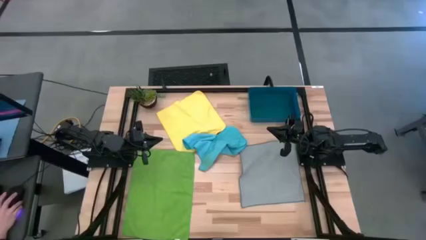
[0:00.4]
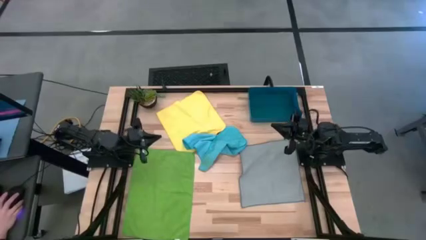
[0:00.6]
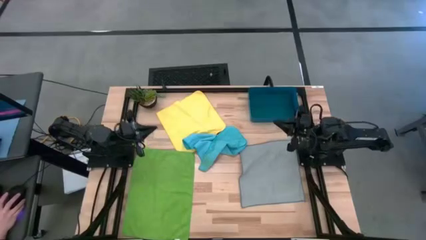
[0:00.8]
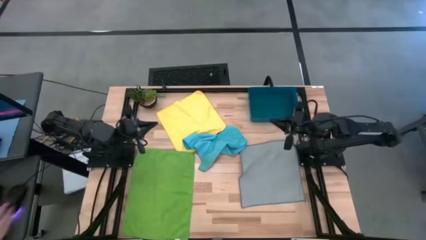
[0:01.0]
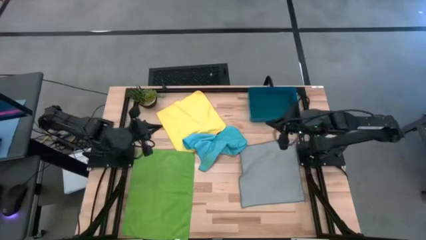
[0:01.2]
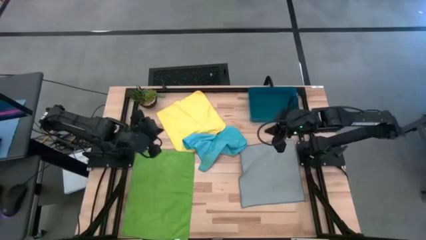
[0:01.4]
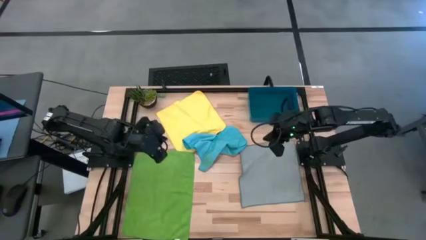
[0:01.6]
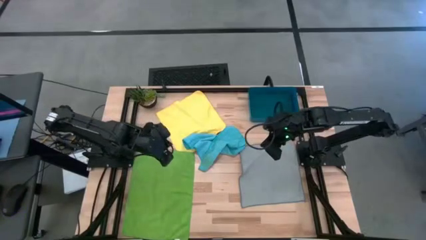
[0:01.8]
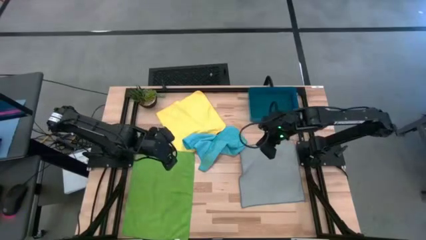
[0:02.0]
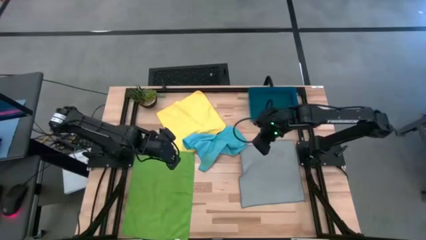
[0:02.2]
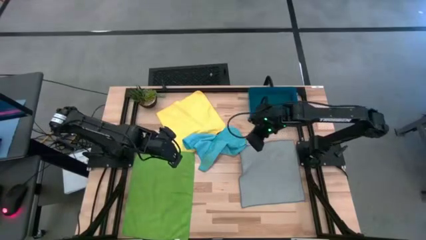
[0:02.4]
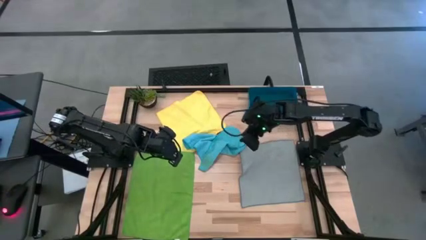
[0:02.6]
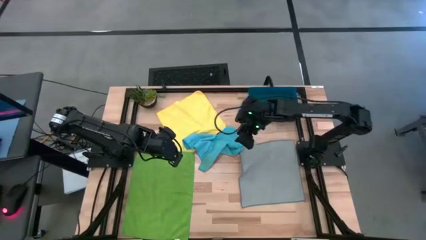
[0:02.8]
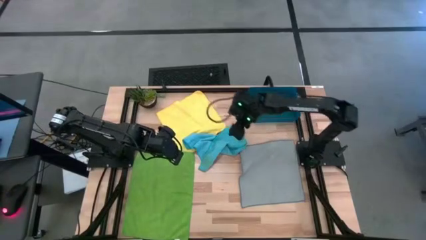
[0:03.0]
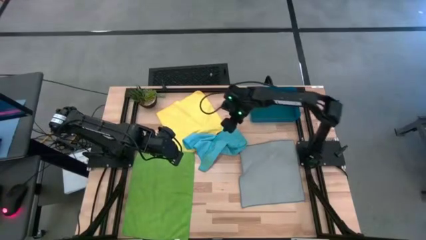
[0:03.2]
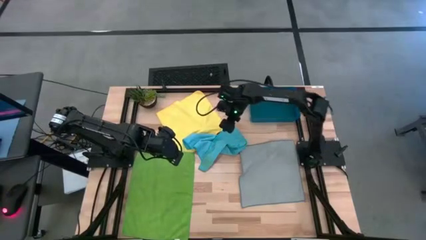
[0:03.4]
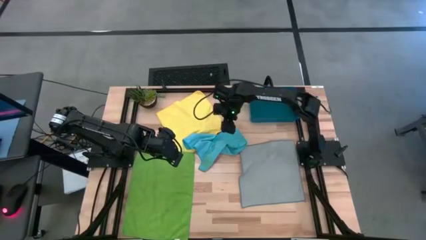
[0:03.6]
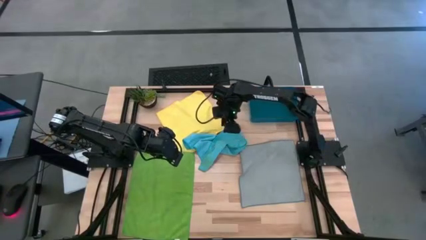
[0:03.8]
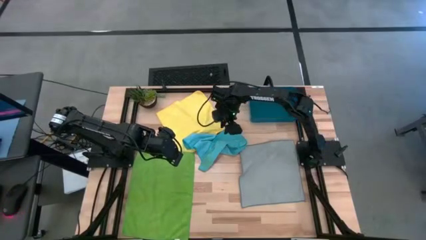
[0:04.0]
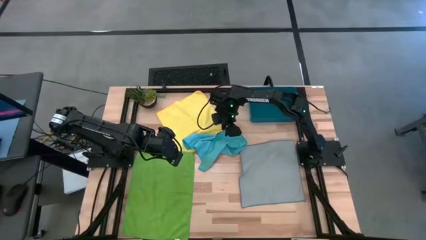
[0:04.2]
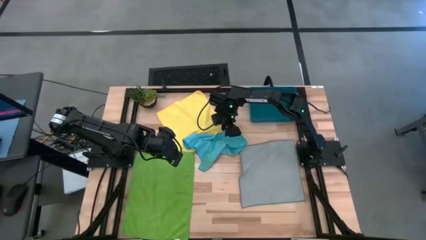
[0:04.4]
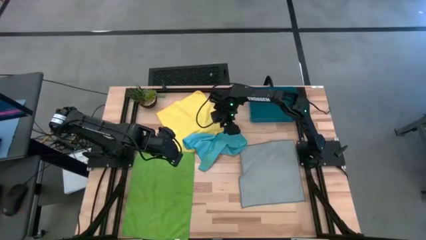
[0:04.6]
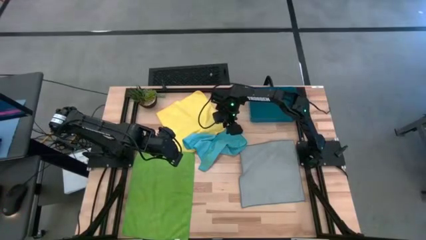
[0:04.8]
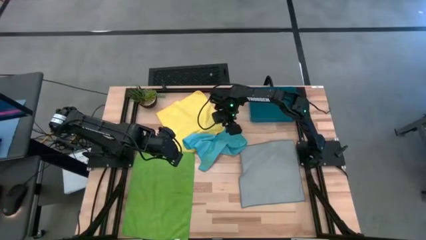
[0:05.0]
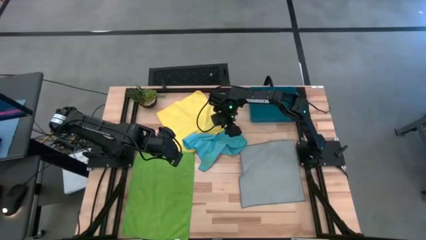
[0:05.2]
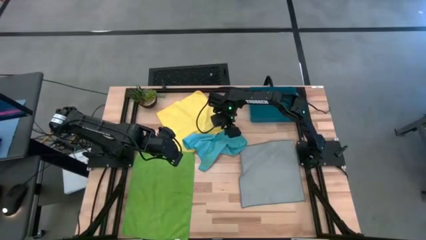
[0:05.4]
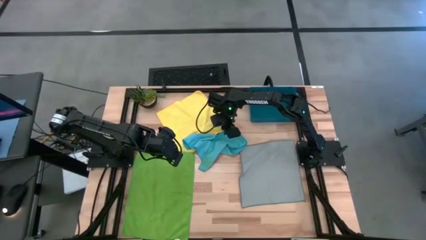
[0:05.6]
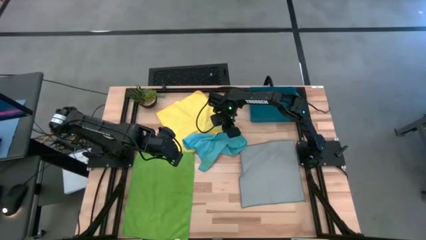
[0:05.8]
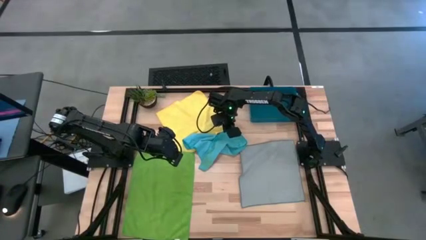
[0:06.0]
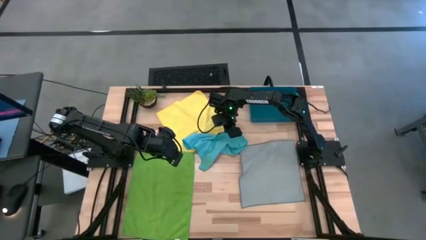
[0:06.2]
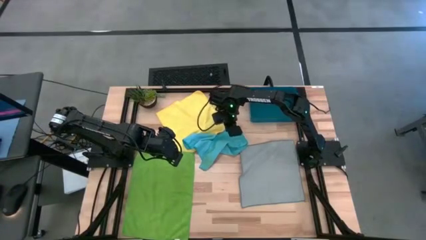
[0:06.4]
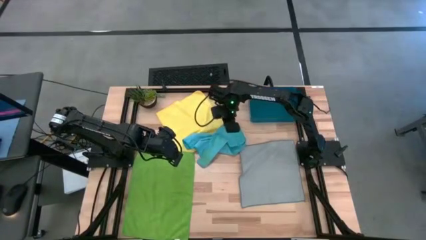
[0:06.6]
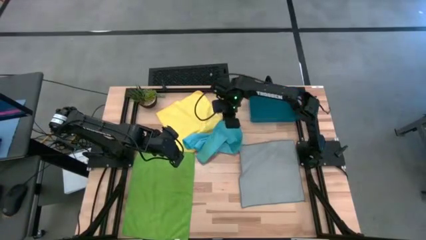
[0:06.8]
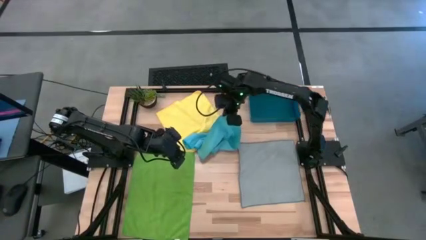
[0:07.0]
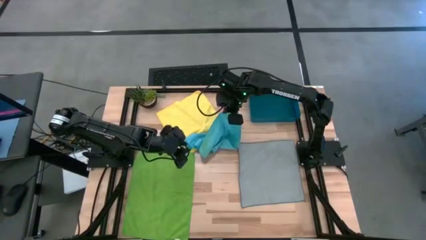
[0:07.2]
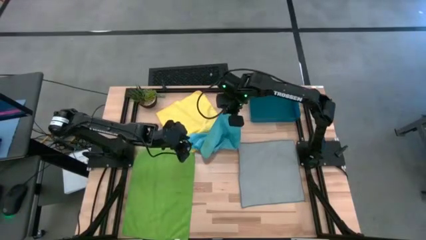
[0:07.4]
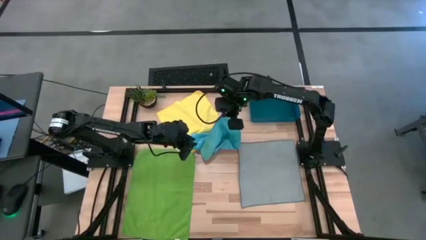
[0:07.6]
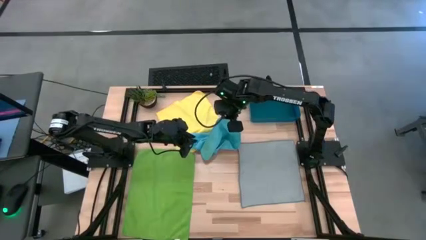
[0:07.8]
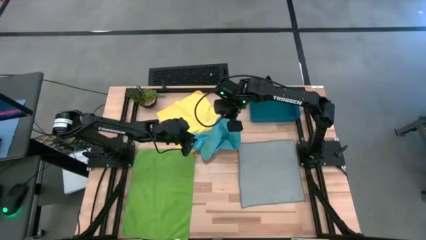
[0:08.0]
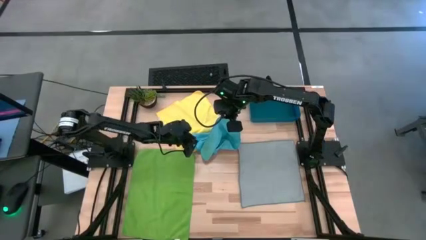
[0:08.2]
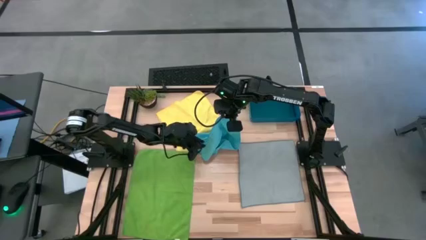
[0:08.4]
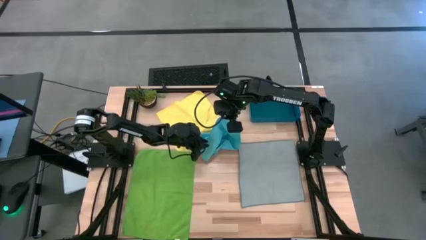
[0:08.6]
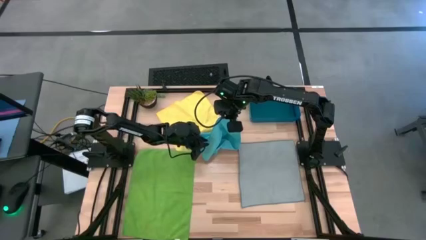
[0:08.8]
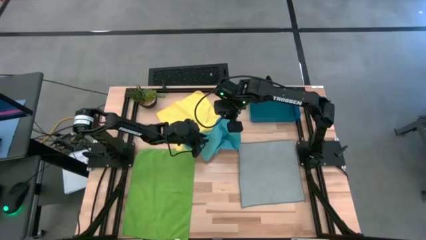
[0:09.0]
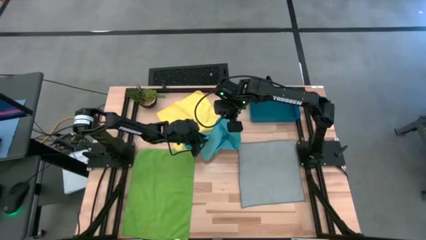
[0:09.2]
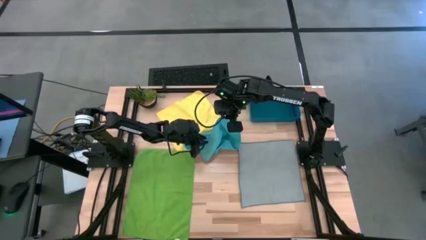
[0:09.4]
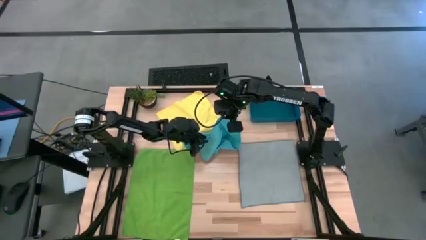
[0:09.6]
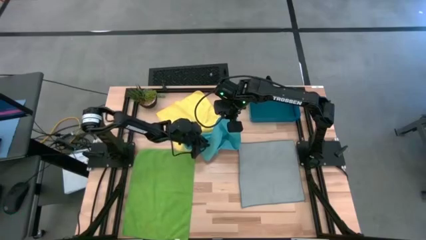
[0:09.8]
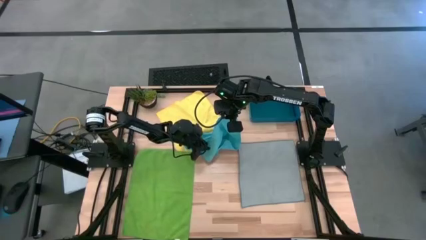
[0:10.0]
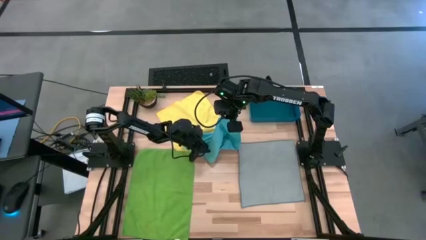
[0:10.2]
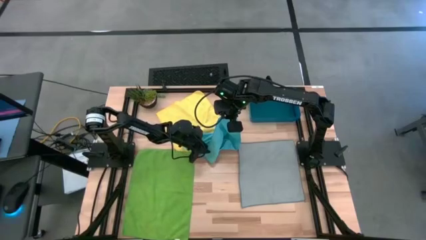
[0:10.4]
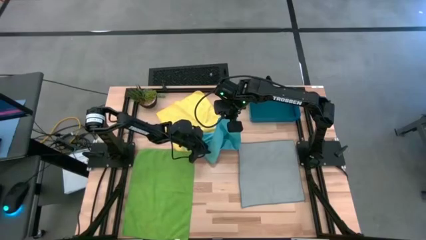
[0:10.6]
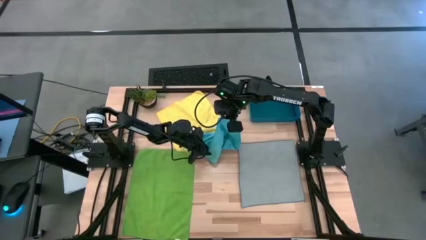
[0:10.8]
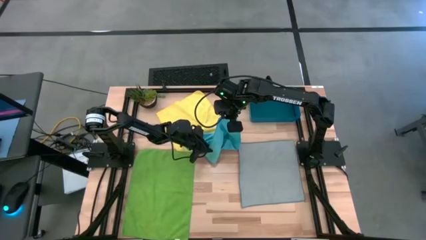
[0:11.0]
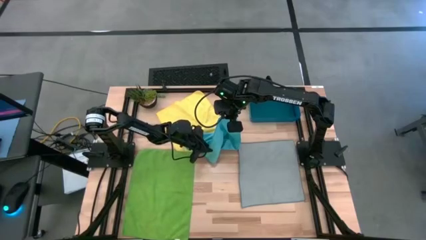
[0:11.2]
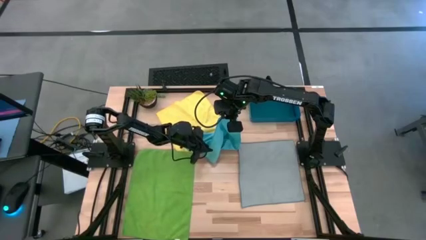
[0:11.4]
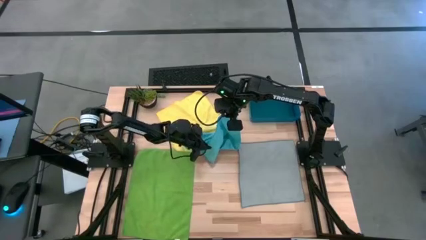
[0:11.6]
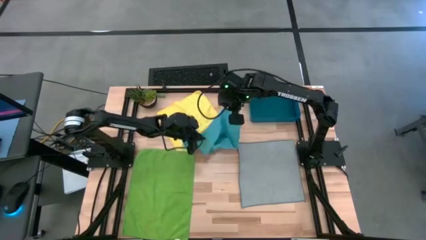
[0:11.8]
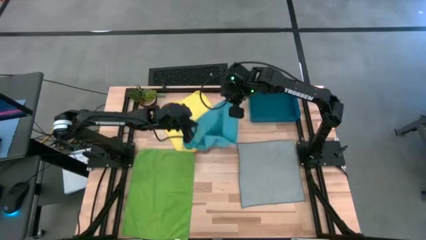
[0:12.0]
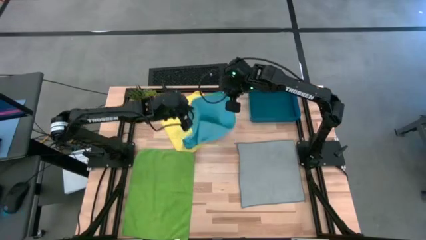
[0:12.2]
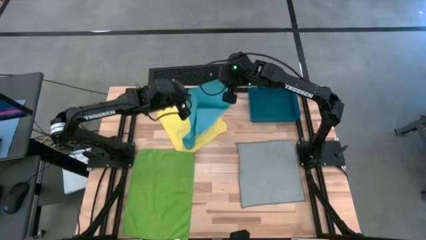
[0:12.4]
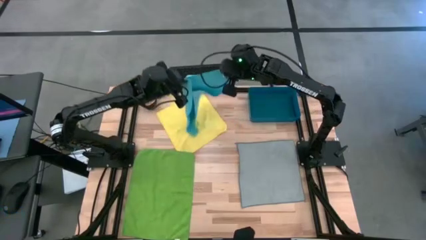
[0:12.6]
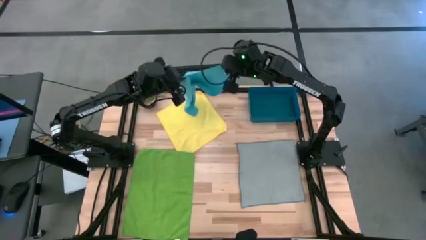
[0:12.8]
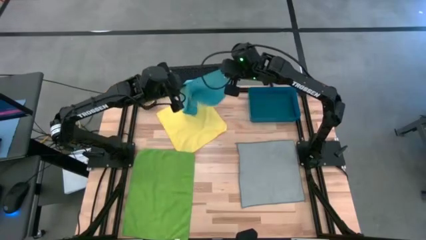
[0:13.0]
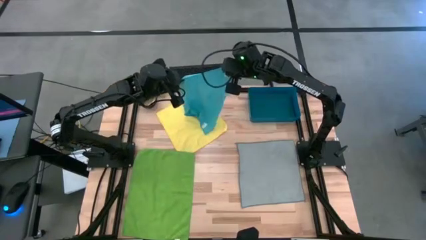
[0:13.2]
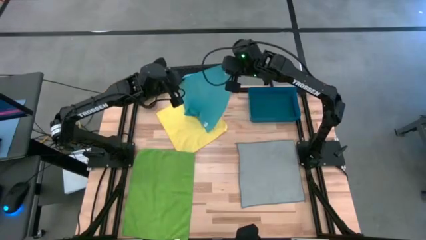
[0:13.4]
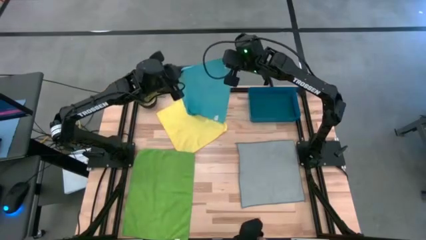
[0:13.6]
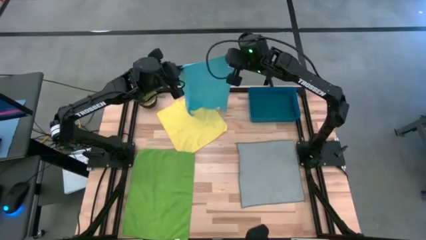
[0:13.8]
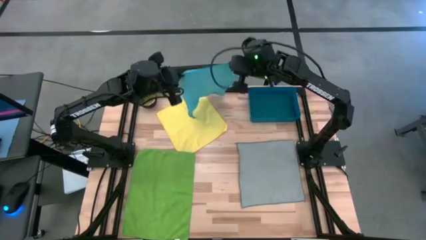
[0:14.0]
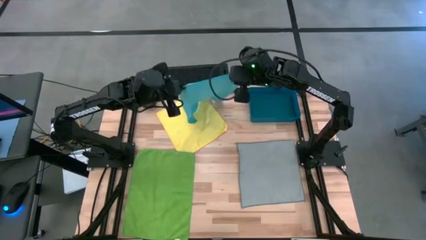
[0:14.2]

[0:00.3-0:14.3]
Task: Fold microfiber towels
Fold the blue microfiber cloth
